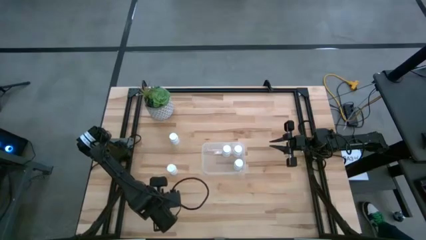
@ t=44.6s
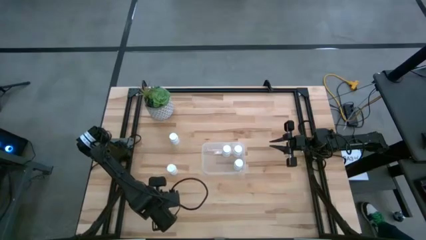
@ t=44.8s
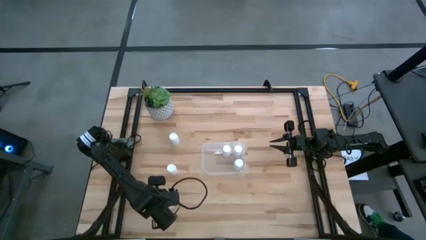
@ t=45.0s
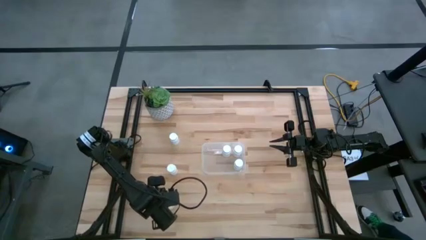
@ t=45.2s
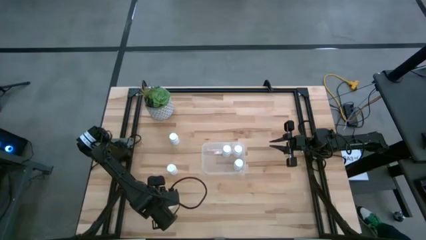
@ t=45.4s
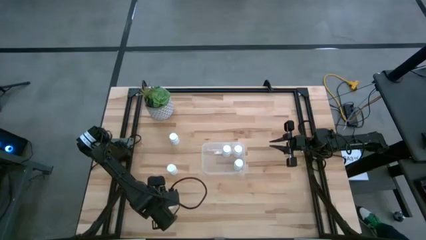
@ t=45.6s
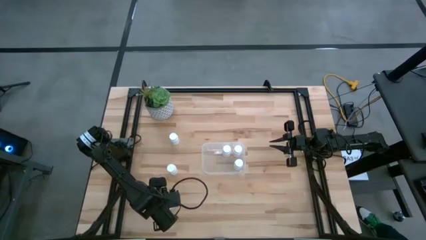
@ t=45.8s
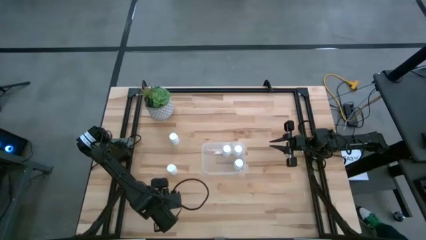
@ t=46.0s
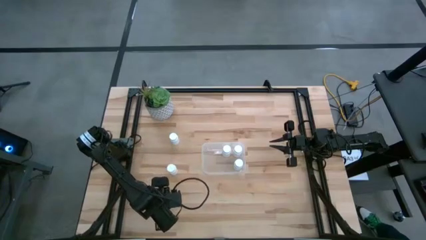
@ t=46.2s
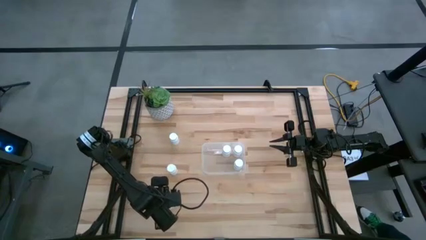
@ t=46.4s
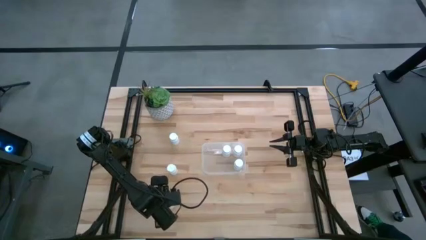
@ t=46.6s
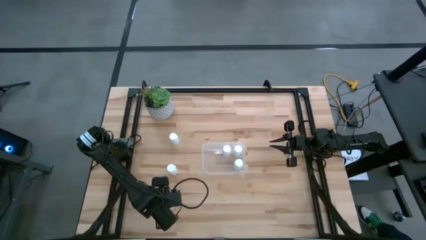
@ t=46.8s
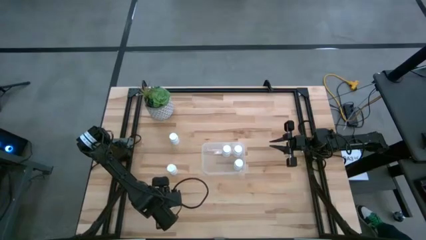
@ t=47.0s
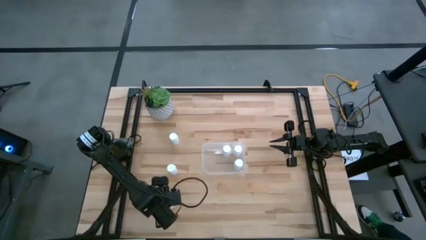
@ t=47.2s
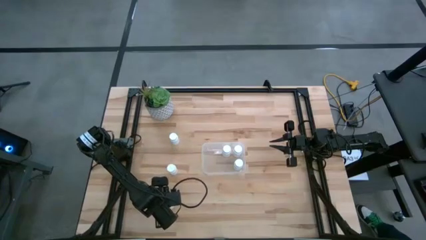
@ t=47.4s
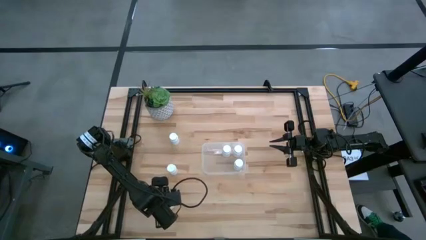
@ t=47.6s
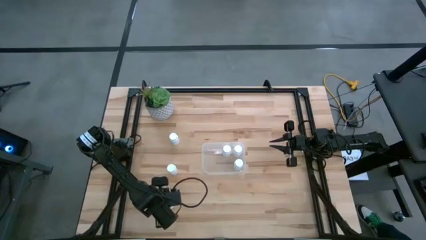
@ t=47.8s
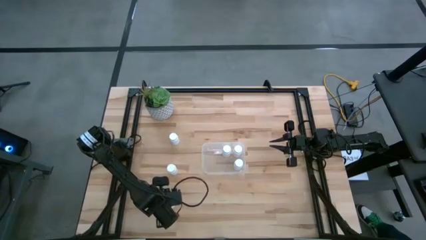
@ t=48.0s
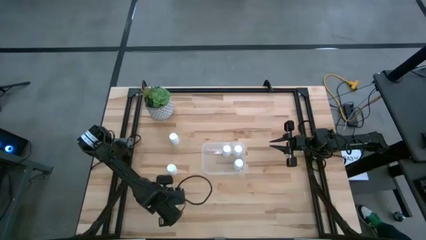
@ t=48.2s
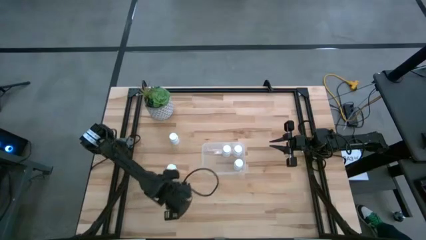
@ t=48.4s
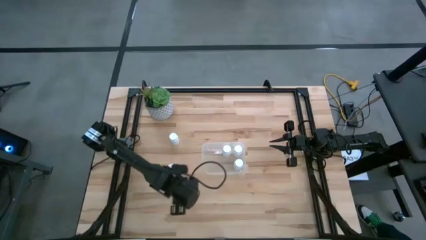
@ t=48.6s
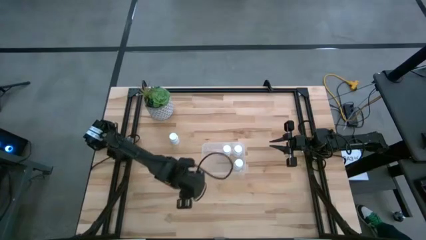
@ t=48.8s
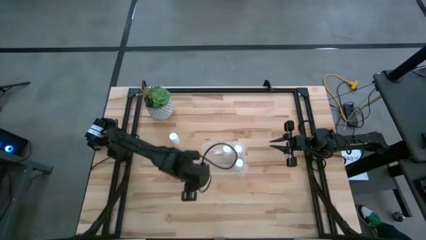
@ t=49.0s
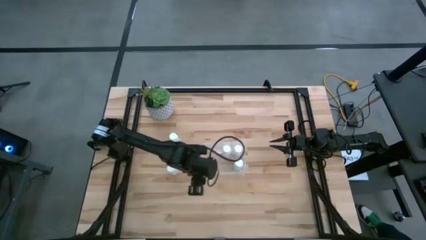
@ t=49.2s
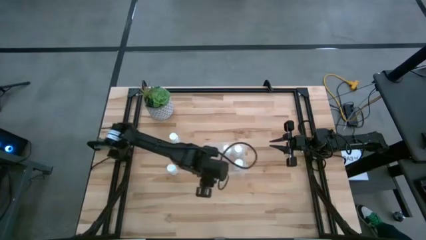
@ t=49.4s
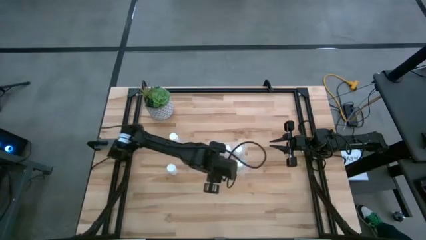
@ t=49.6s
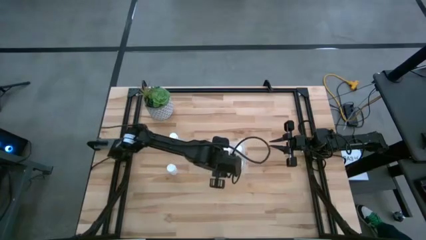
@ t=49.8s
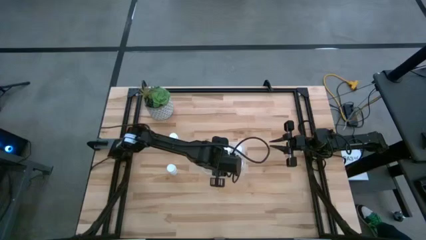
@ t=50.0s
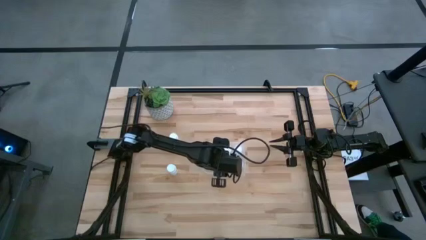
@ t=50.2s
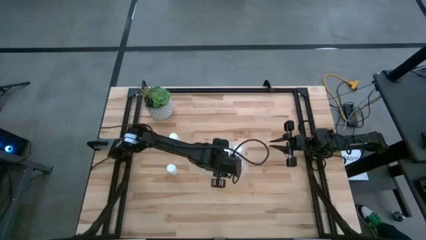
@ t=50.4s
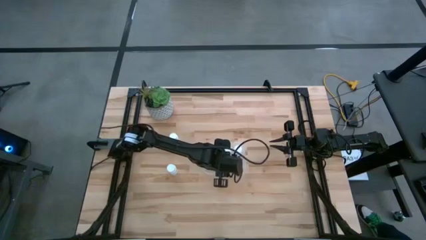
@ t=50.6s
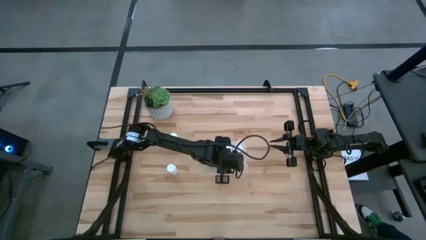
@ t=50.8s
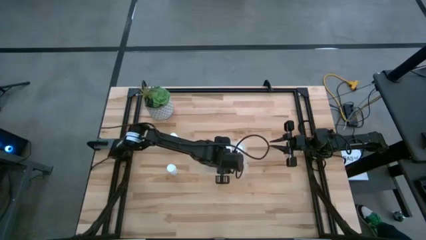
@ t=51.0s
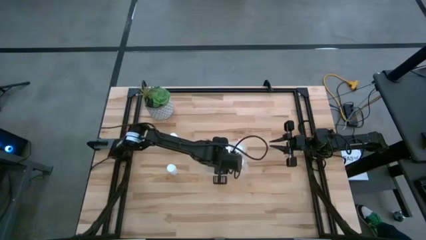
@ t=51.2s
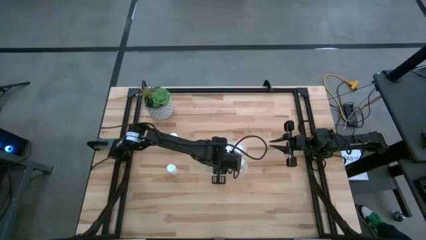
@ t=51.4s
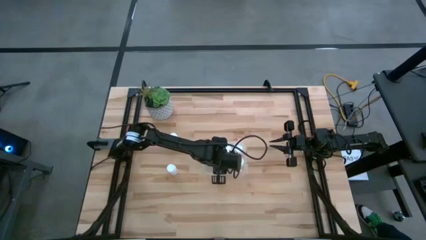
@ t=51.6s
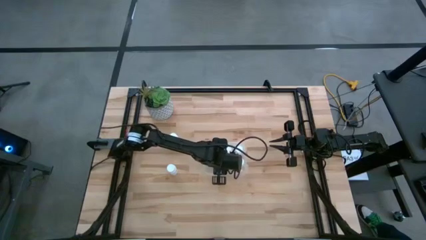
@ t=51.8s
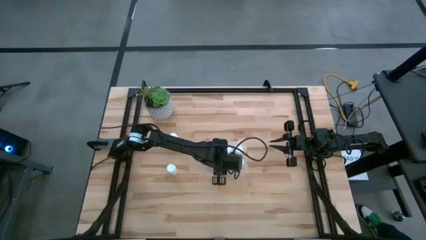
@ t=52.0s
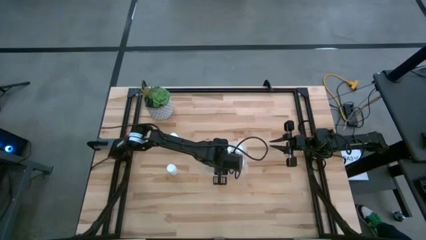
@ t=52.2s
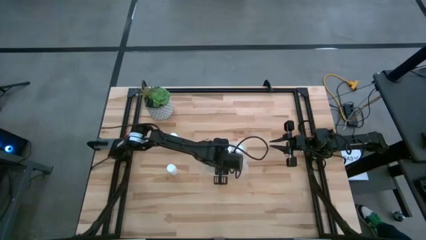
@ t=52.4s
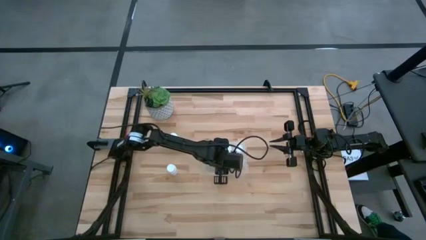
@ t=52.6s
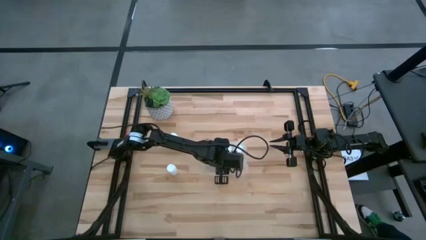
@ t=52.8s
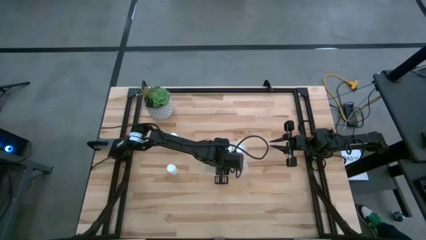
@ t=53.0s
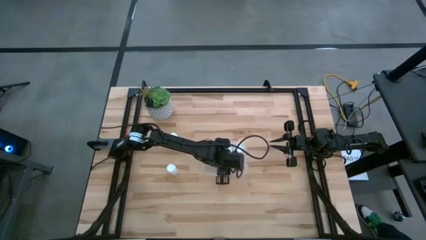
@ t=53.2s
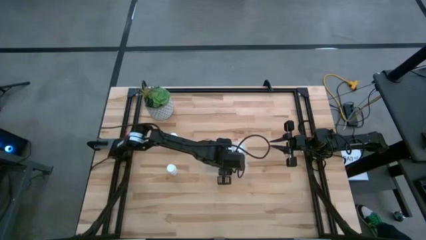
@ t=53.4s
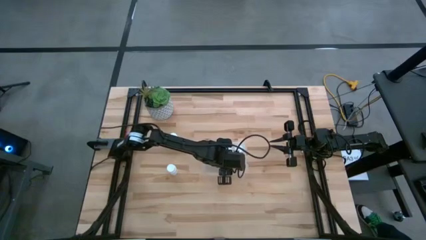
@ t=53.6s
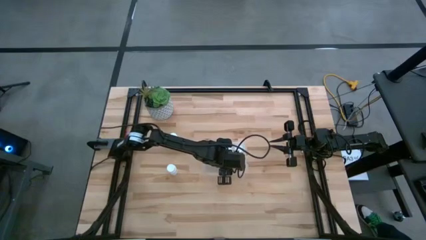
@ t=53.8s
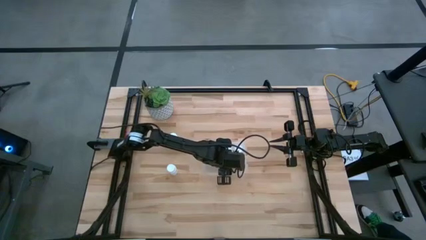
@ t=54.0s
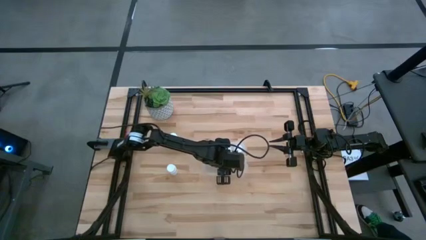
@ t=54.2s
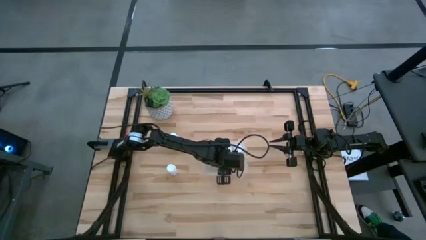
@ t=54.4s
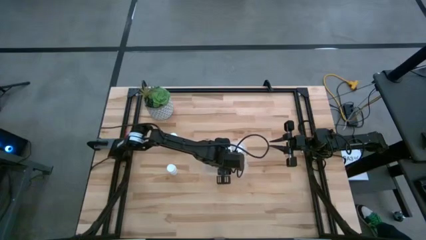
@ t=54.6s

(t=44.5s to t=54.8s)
Task: Pick and place pill bottles into a basket
Put the bottom white pill bottle into the transparent bin

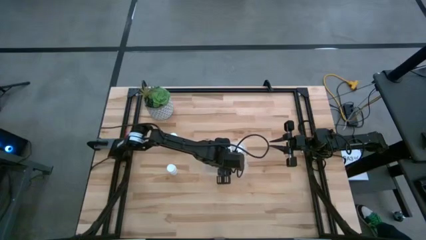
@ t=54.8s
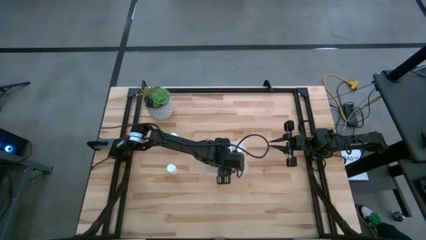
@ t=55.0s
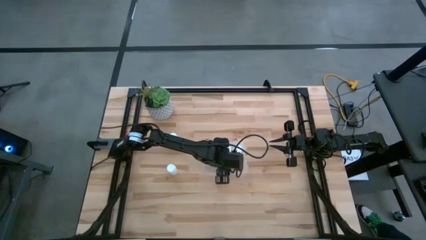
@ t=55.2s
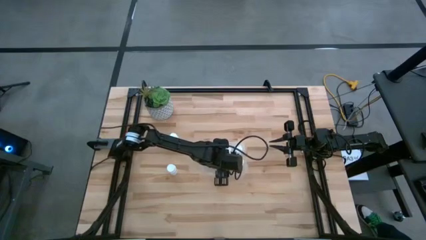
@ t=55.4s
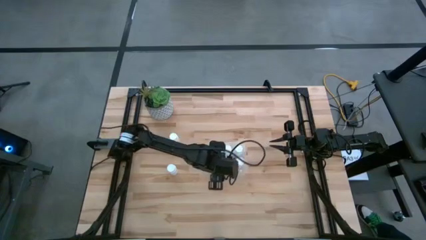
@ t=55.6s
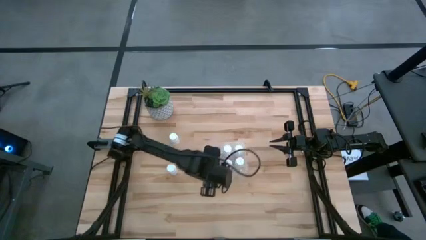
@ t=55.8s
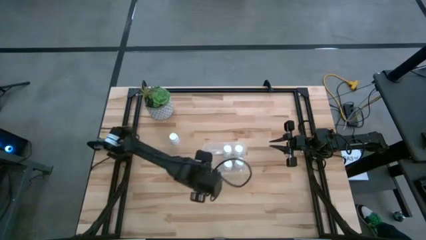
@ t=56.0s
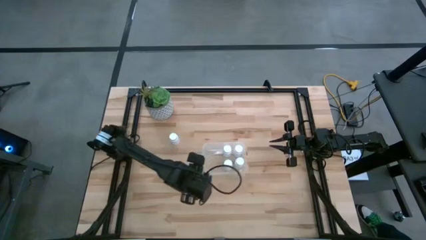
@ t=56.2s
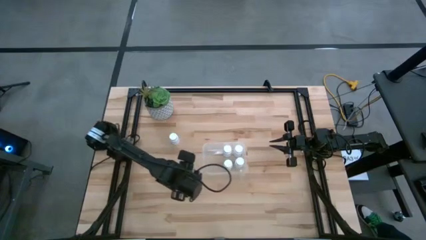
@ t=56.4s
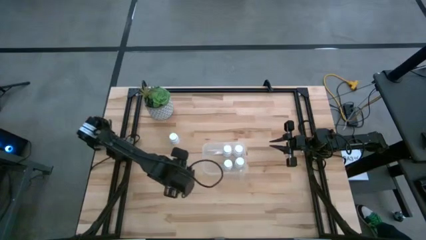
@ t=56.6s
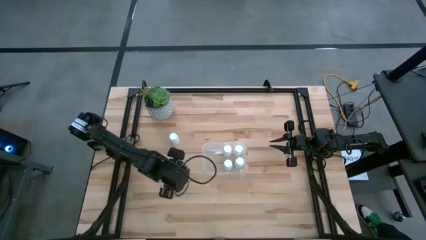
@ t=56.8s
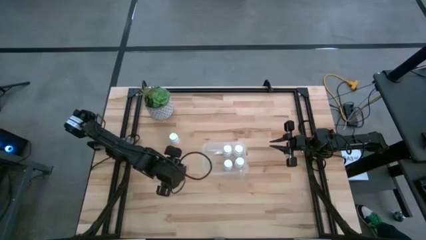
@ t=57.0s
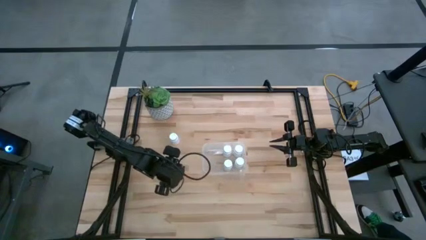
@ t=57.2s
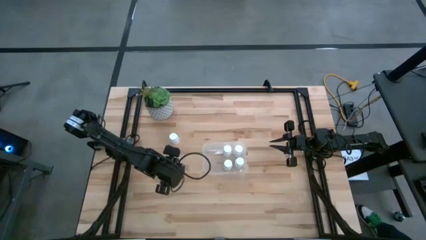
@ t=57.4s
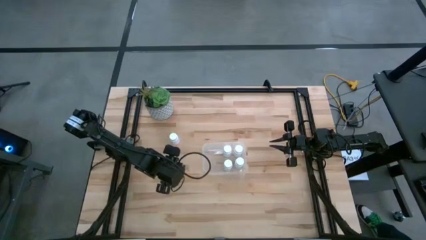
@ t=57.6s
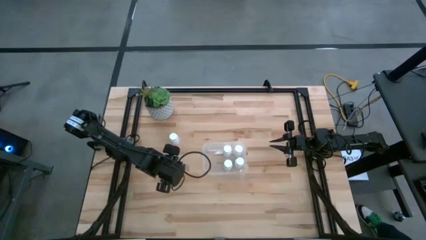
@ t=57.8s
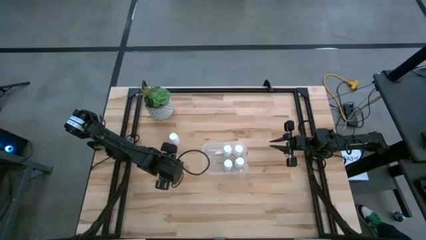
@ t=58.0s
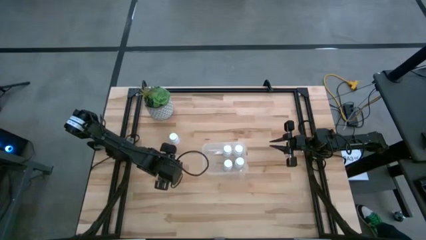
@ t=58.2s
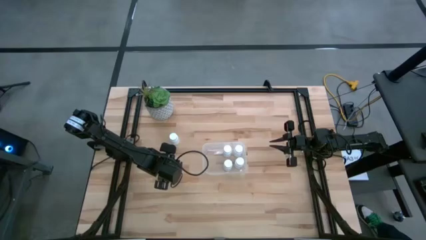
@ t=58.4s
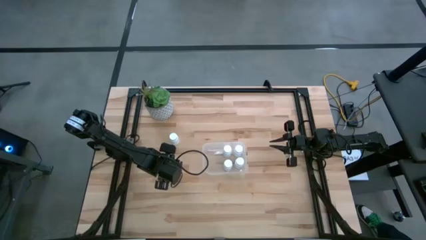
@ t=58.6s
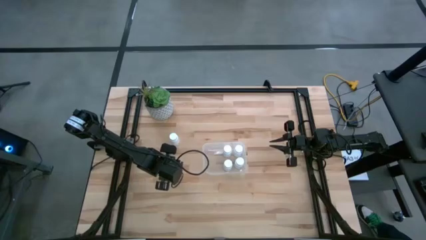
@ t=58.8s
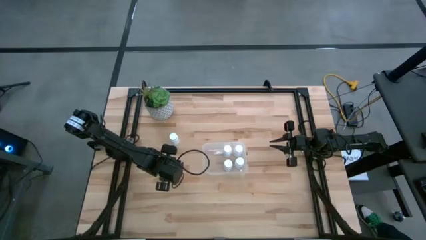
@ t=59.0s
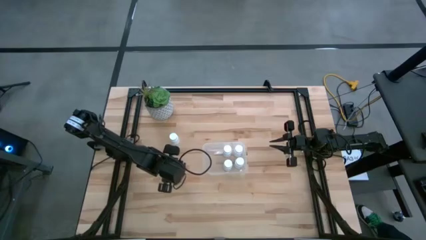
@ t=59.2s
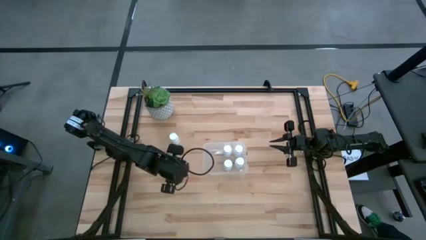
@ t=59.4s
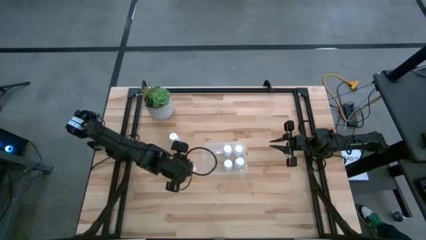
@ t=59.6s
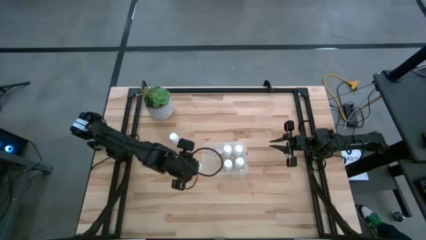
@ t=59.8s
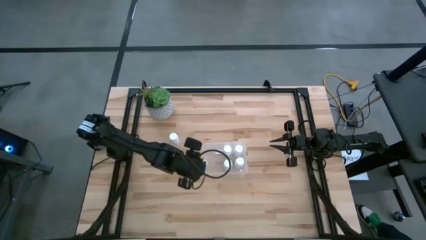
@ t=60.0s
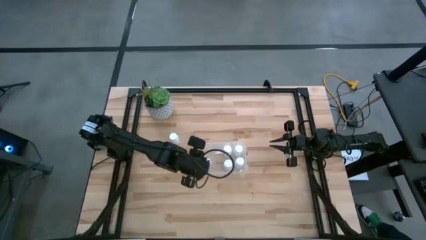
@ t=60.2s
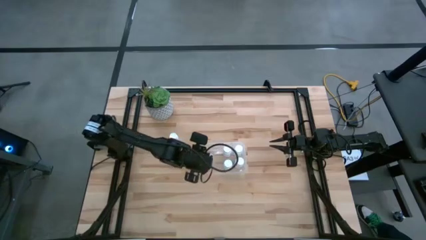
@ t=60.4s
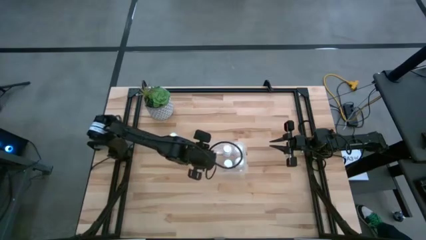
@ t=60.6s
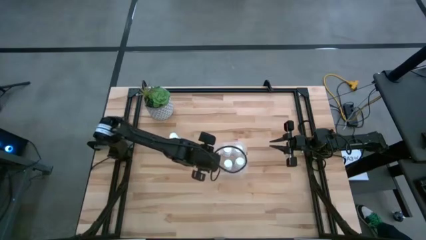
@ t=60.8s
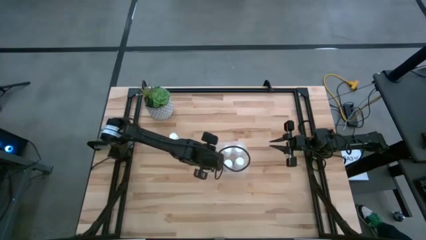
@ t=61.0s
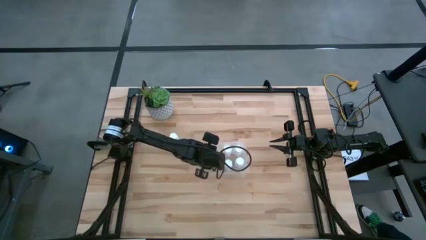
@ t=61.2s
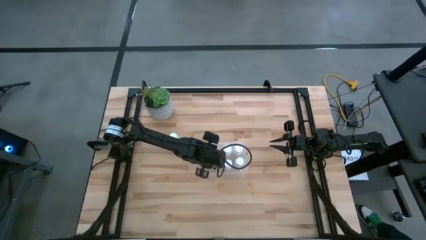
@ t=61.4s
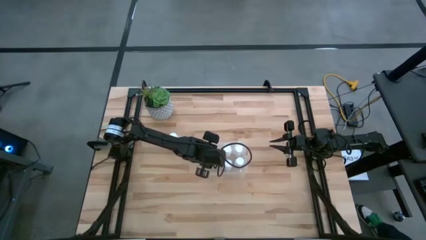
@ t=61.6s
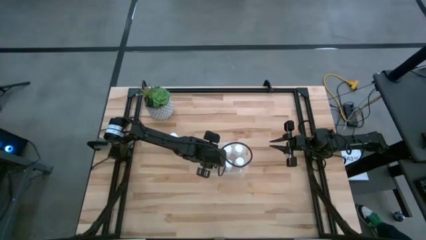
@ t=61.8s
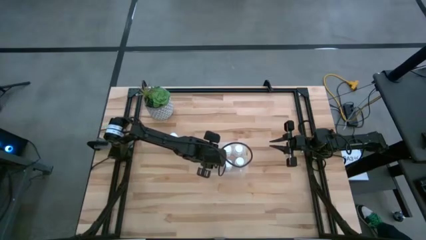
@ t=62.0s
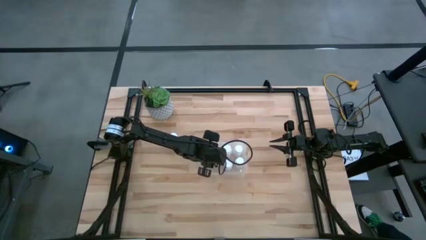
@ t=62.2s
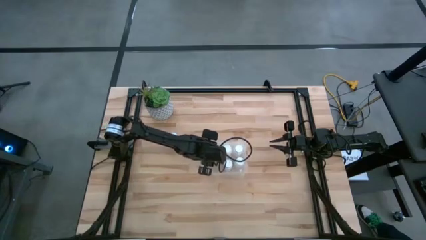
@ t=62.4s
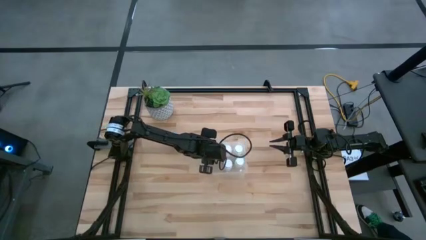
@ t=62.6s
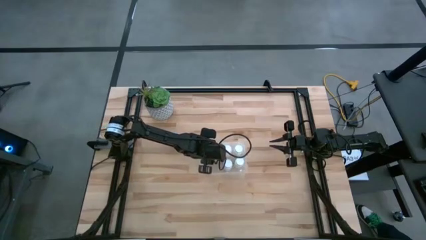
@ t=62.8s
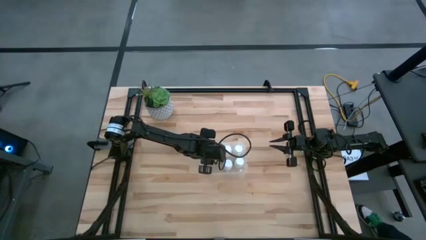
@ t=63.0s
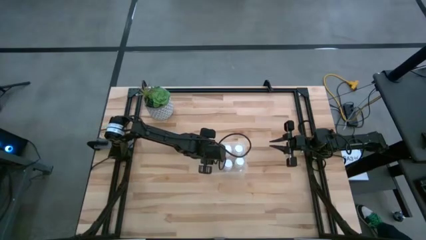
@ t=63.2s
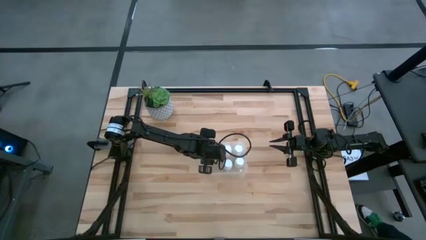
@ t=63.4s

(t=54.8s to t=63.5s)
Put the bottom white pill bottle into the transparent bin
